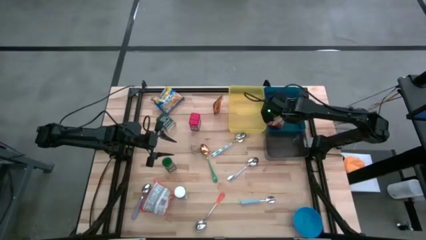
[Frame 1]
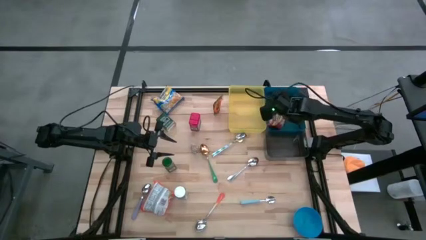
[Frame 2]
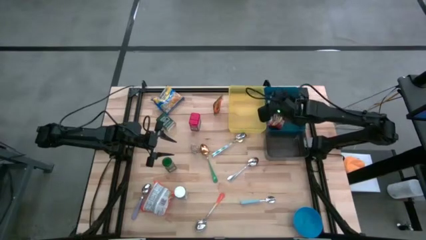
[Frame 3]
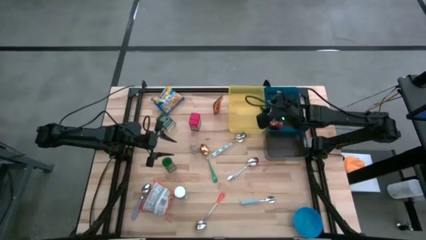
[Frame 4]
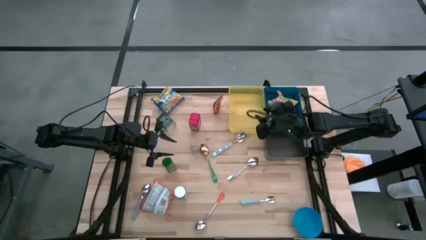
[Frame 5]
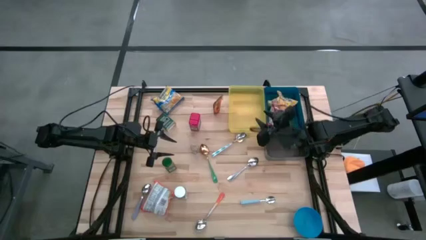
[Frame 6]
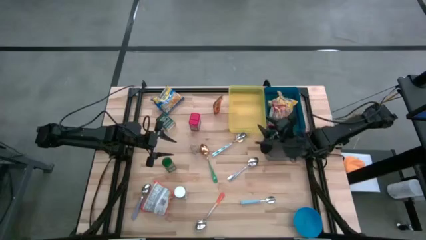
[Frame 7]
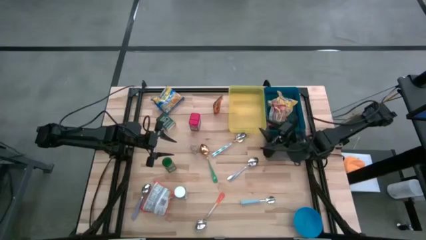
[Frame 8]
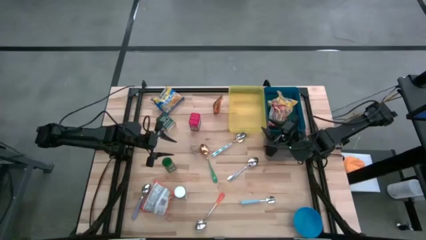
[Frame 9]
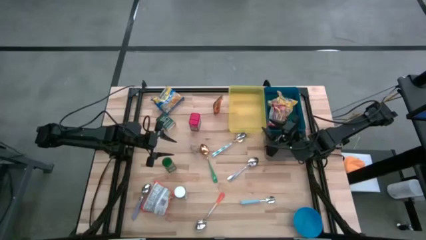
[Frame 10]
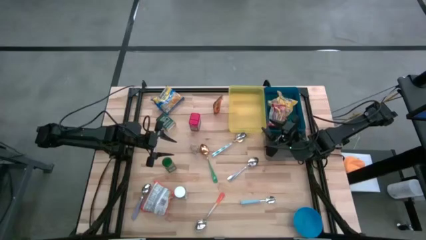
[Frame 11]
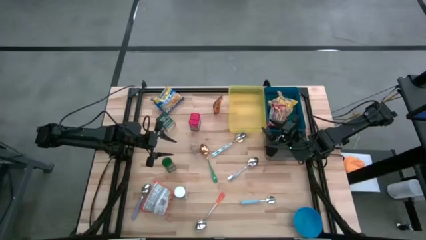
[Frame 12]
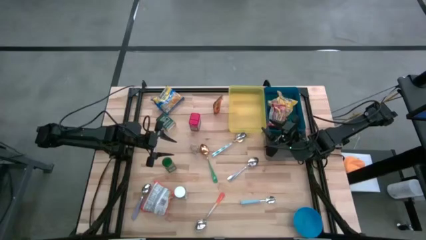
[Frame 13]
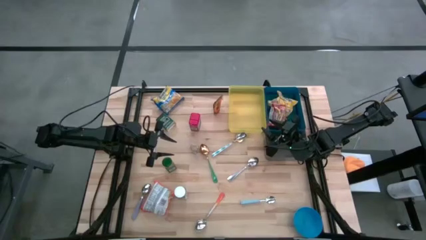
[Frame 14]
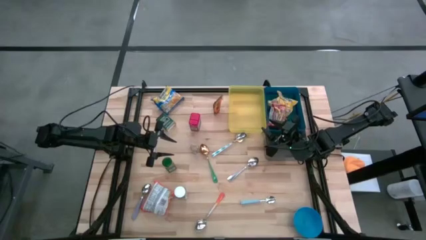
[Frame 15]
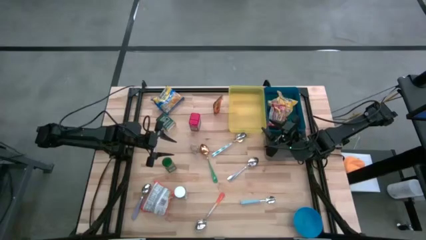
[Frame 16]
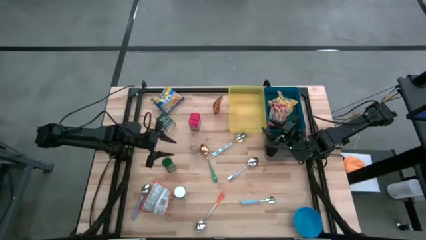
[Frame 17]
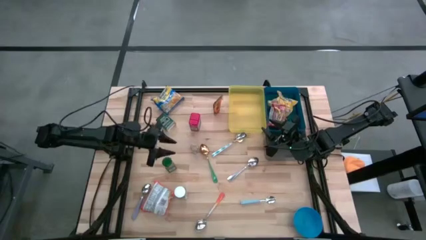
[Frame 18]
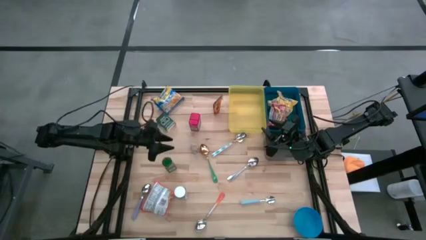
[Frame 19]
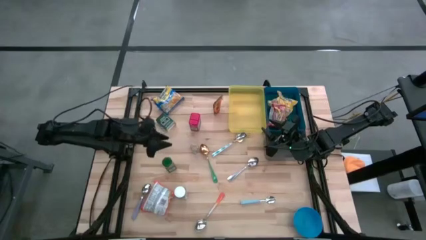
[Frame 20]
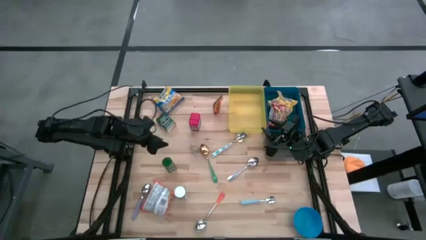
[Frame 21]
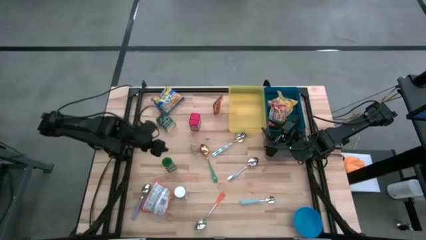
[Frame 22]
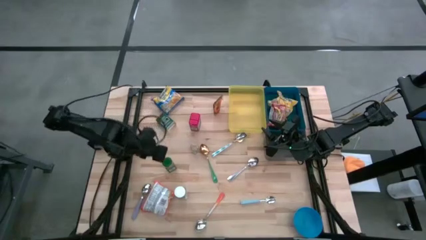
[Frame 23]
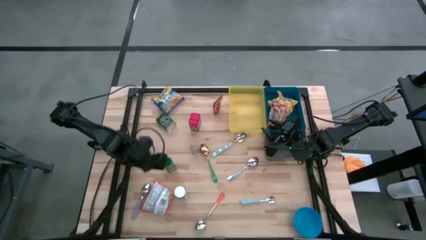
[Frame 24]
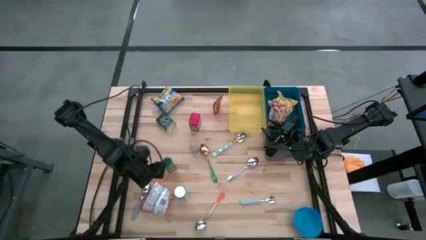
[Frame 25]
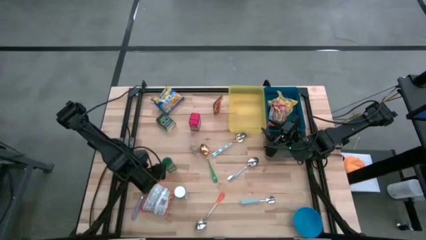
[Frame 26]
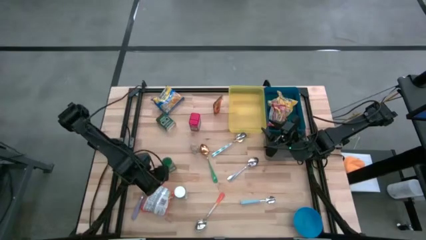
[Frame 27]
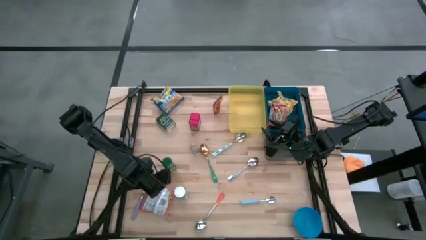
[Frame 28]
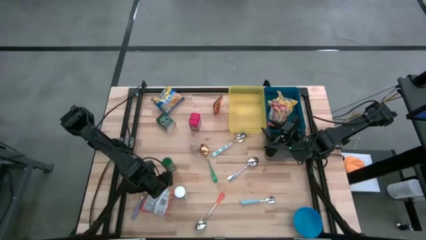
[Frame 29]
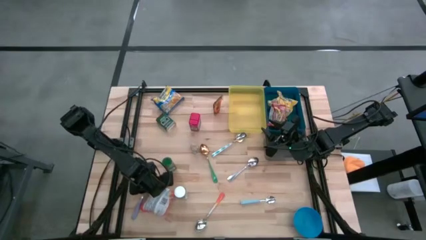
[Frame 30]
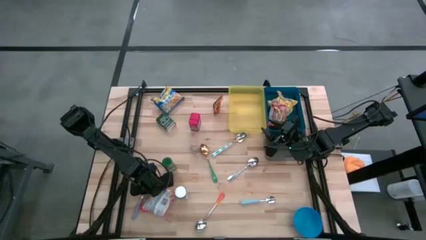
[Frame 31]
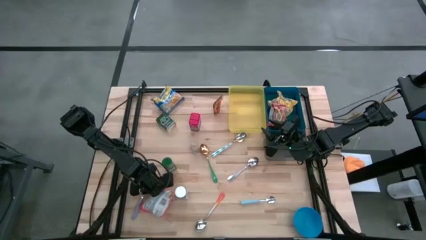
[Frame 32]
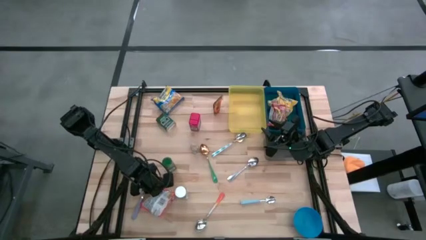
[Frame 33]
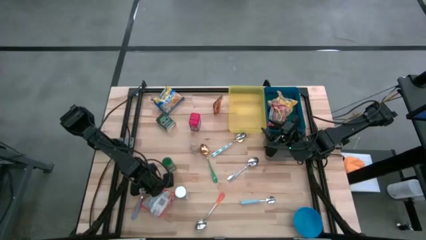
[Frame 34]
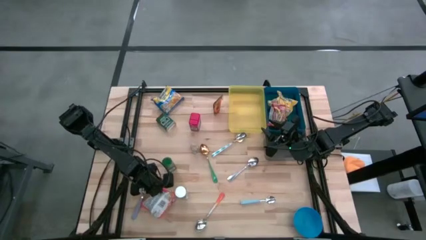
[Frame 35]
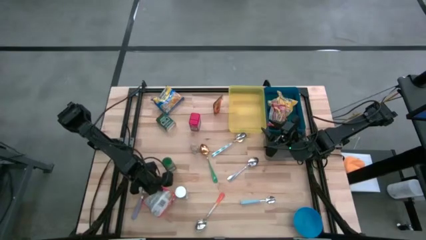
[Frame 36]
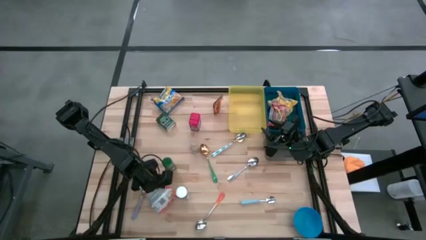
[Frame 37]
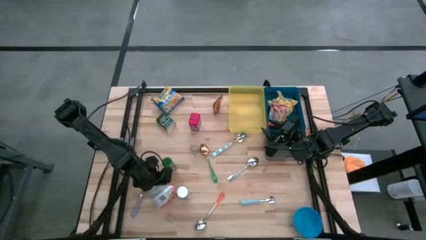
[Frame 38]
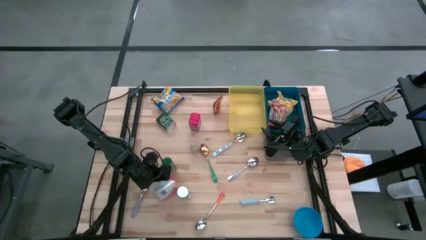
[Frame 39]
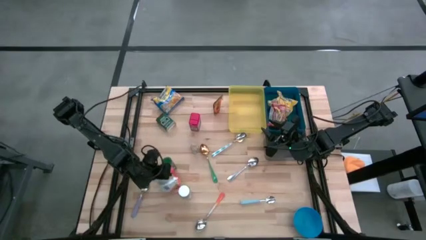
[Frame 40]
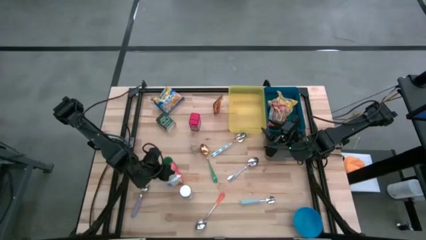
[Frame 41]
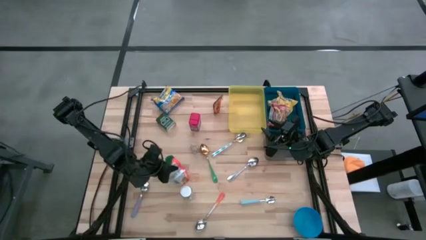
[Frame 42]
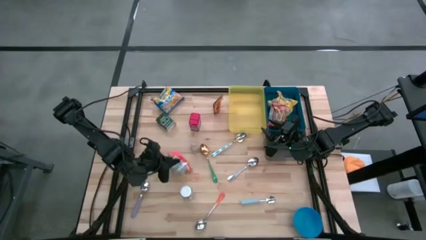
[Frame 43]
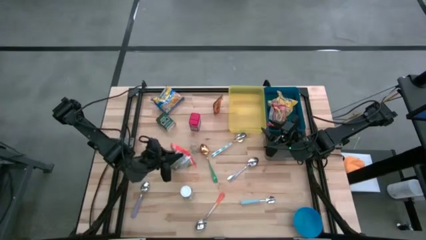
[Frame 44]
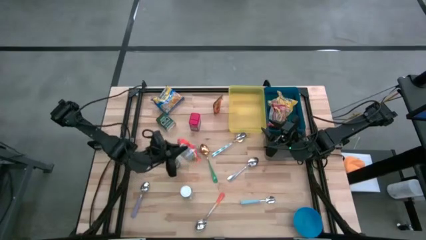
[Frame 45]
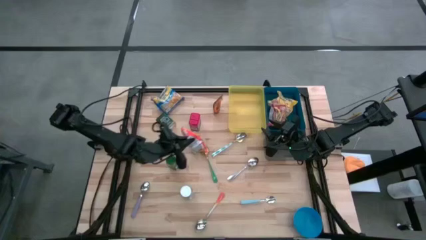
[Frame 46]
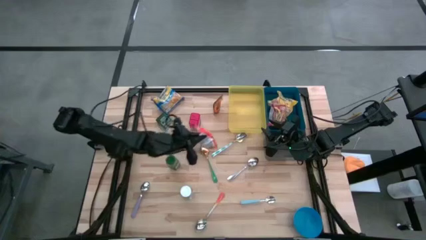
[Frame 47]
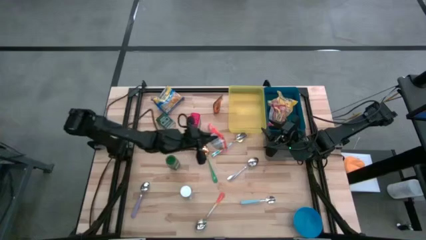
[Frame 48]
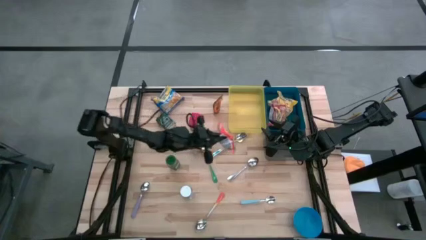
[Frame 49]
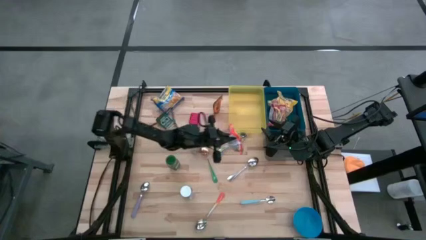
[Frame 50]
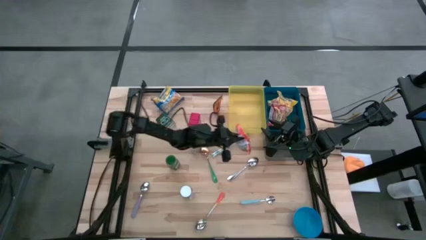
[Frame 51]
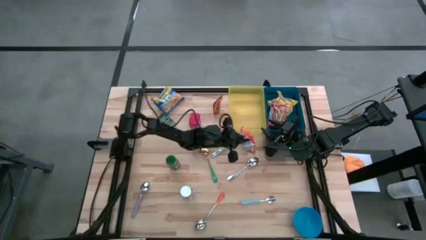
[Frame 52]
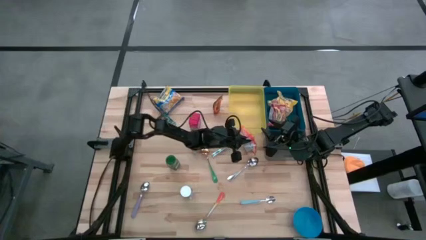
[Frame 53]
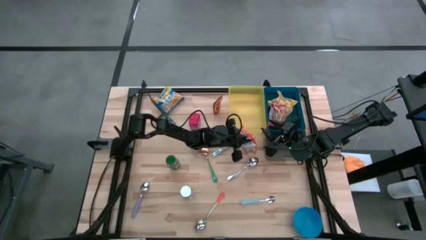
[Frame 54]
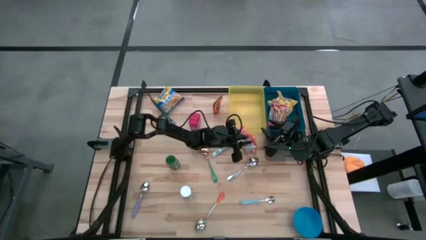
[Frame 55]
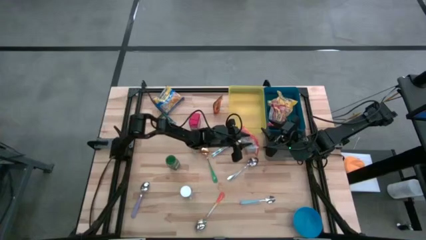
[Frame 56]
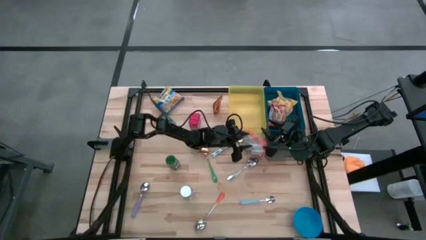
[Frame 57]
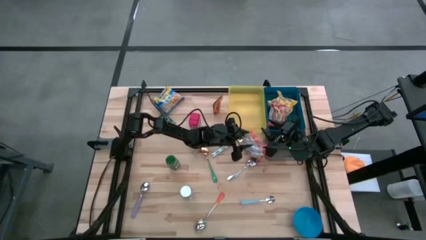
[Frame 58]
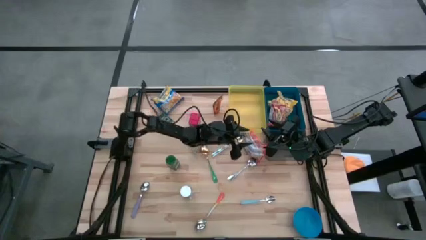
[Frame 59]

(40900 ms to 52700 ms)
Put the orange noodle pack into the blue bin
